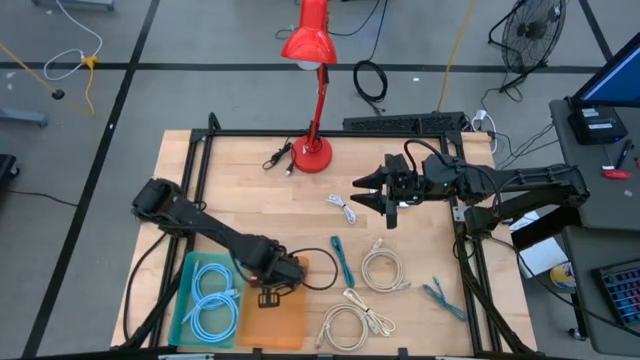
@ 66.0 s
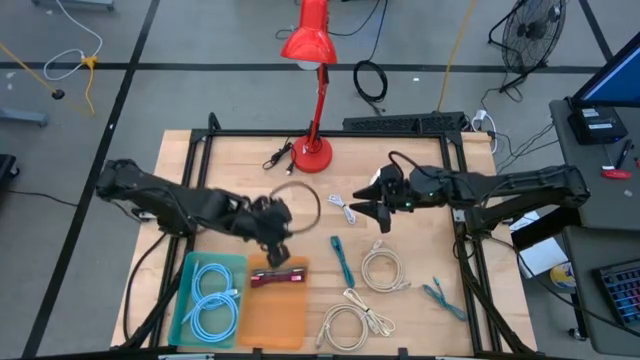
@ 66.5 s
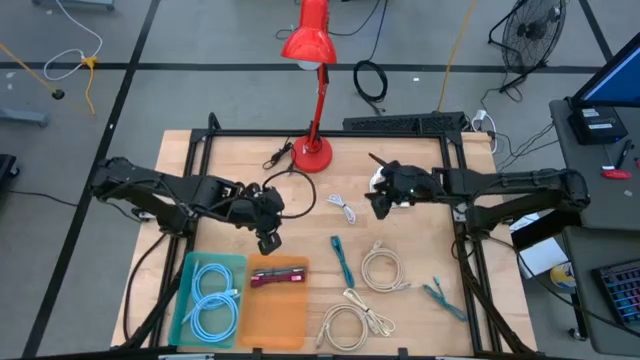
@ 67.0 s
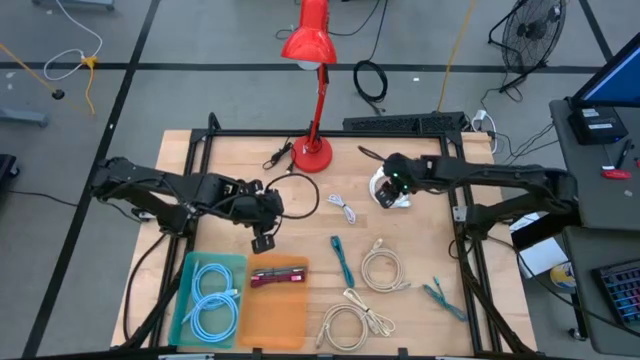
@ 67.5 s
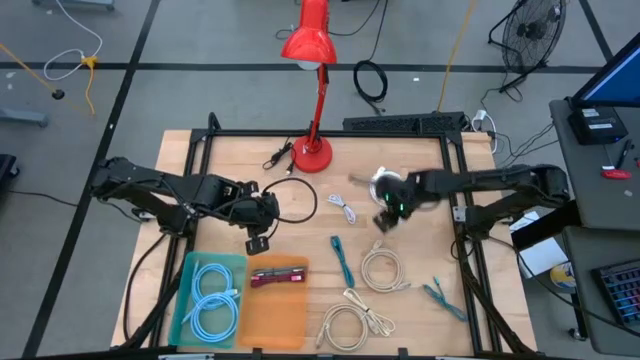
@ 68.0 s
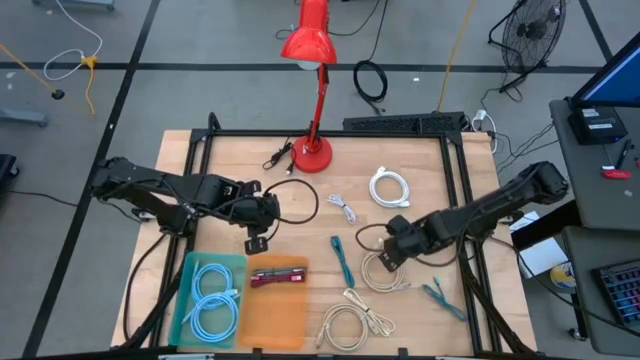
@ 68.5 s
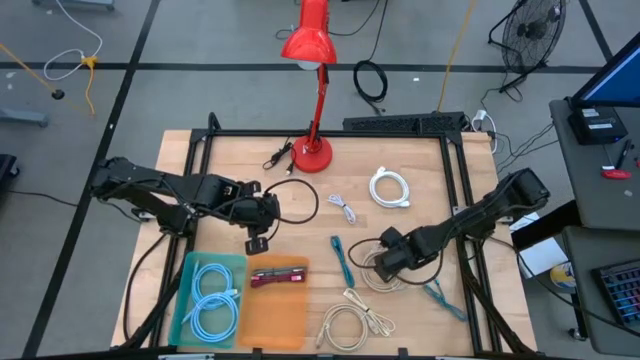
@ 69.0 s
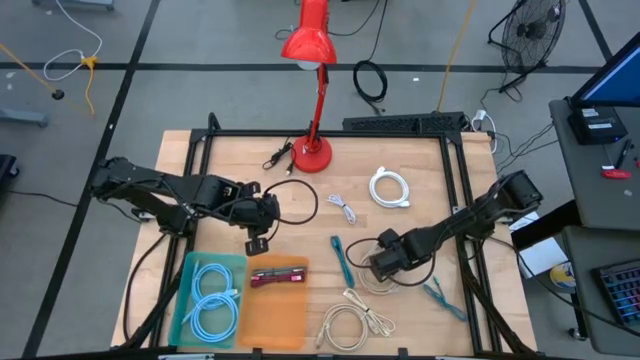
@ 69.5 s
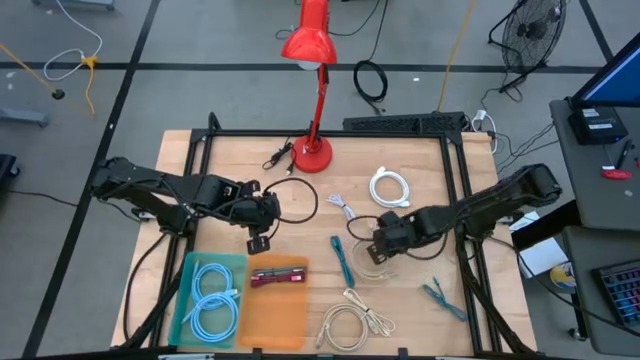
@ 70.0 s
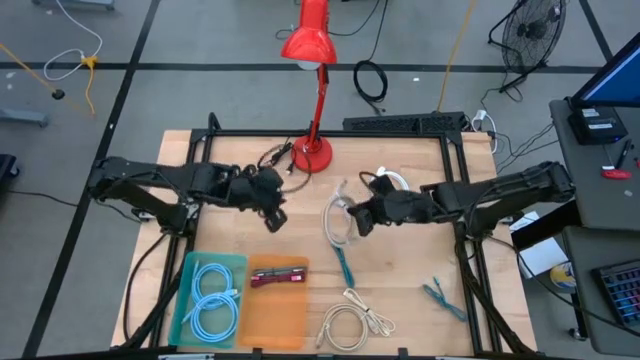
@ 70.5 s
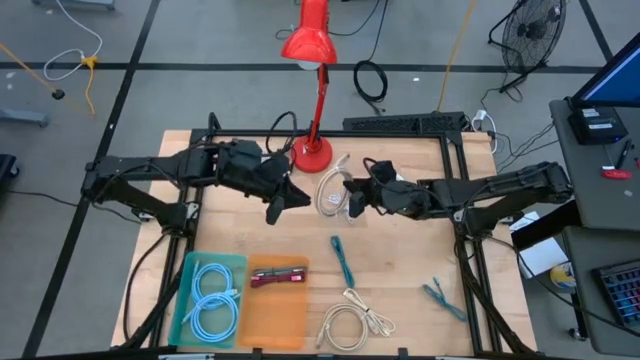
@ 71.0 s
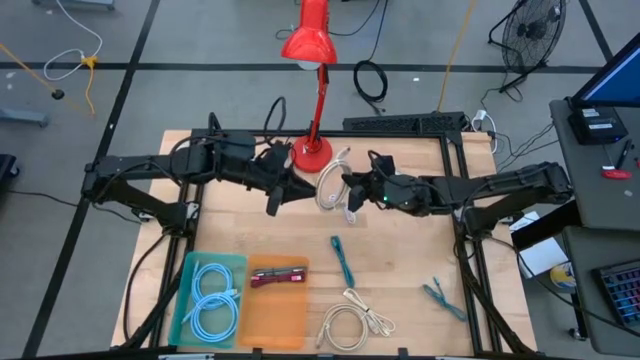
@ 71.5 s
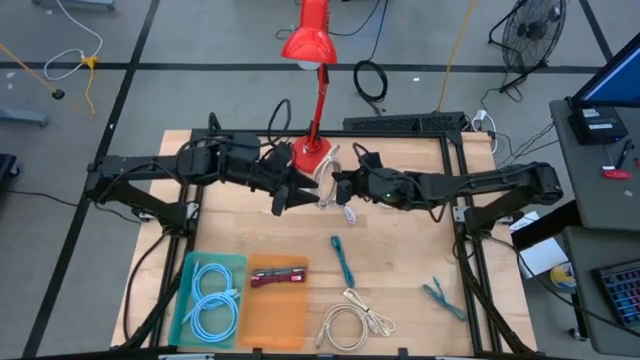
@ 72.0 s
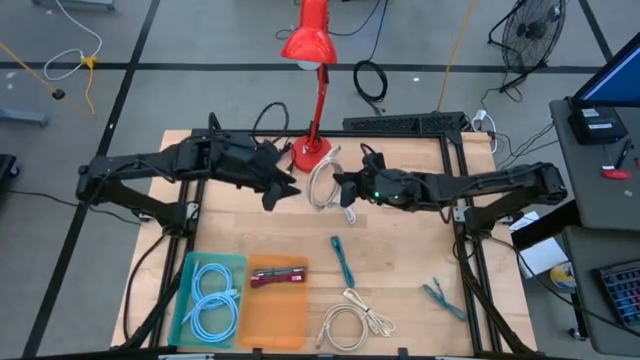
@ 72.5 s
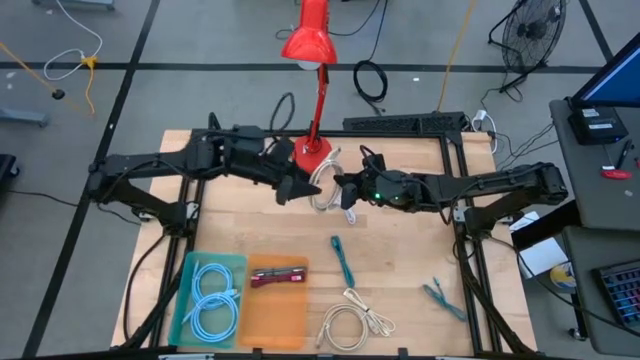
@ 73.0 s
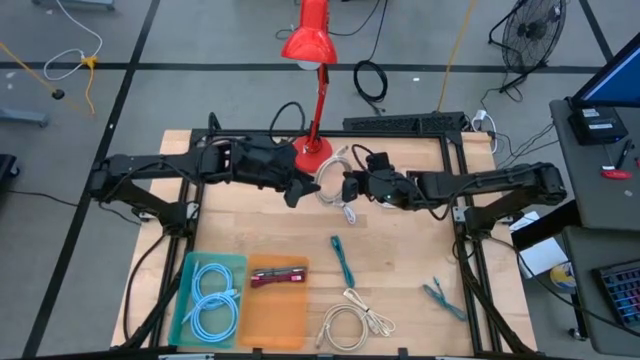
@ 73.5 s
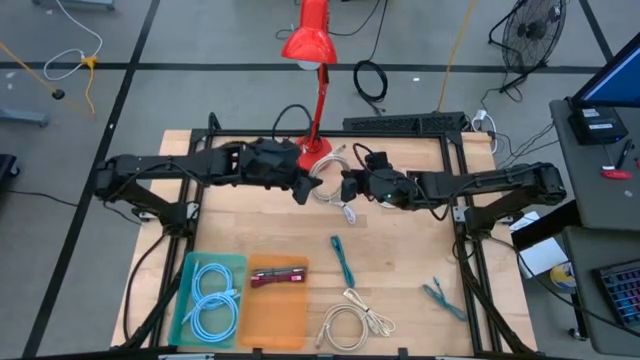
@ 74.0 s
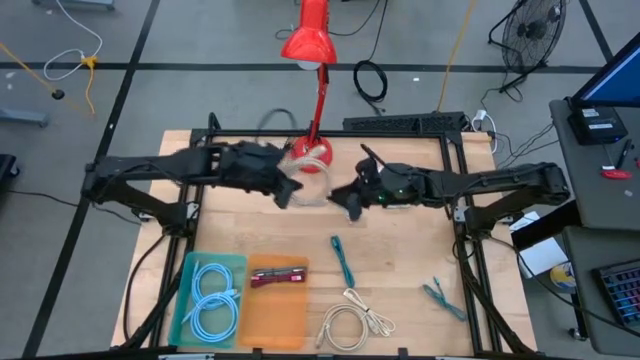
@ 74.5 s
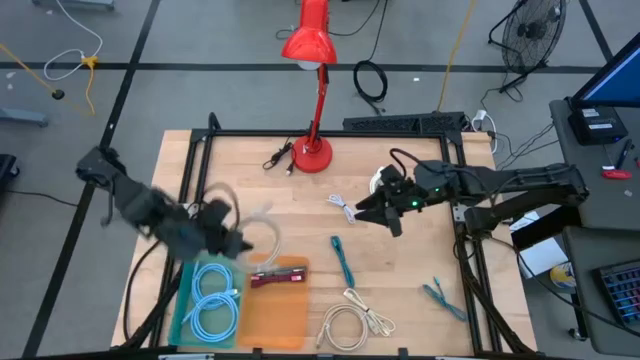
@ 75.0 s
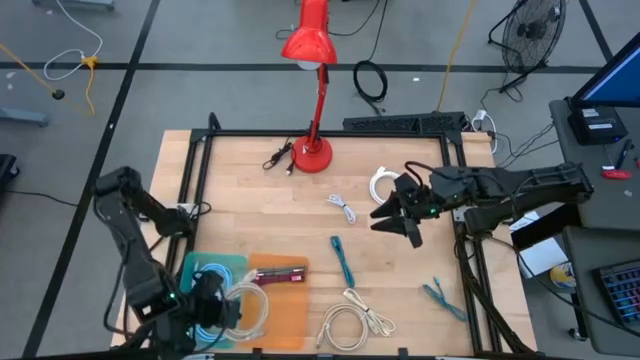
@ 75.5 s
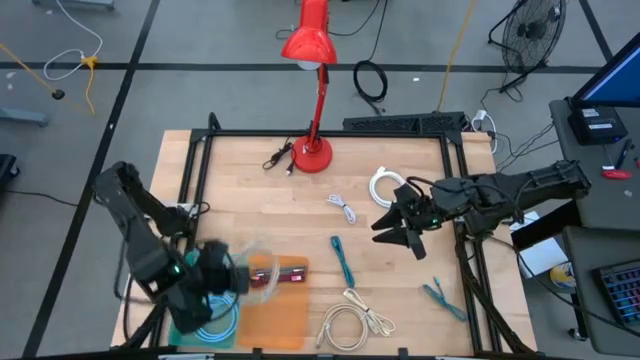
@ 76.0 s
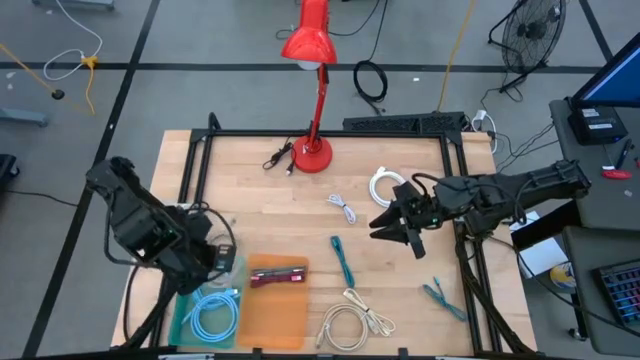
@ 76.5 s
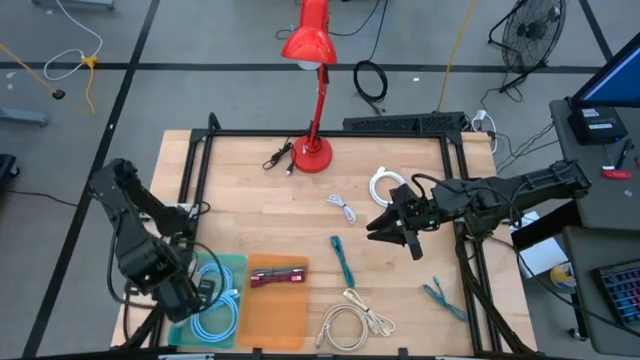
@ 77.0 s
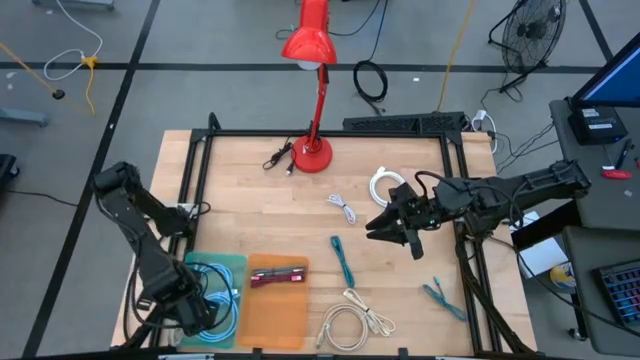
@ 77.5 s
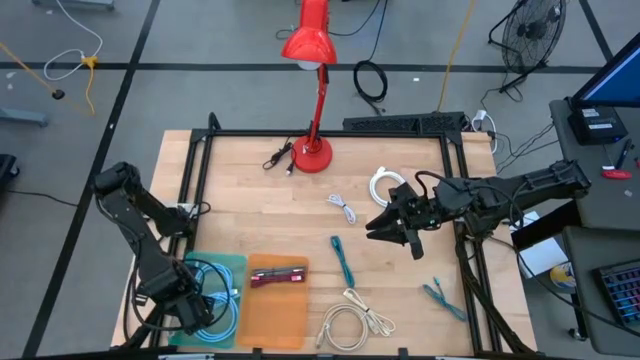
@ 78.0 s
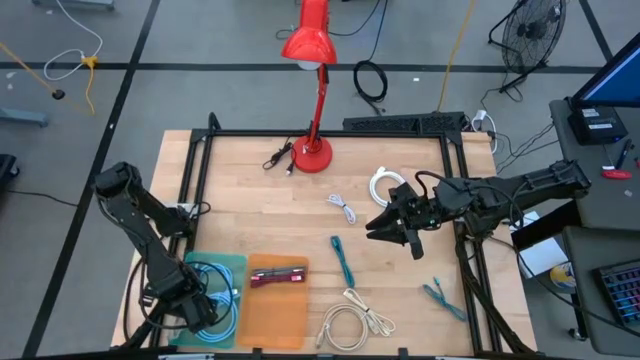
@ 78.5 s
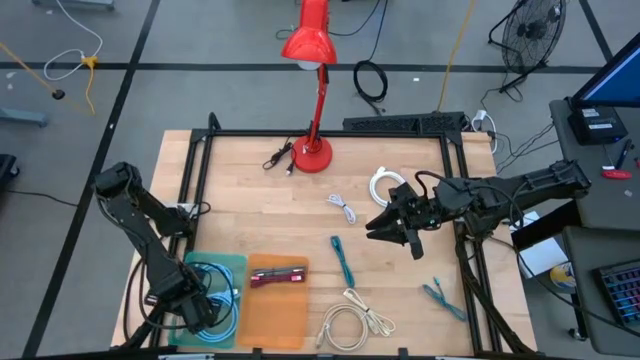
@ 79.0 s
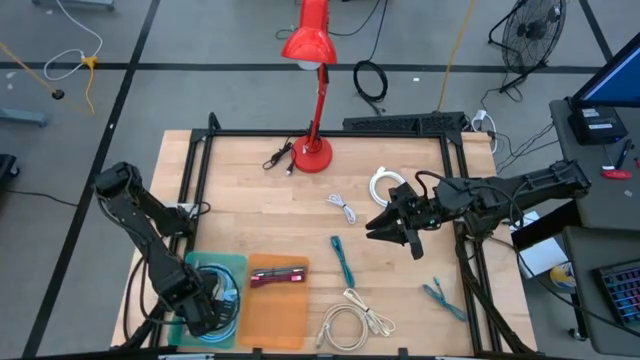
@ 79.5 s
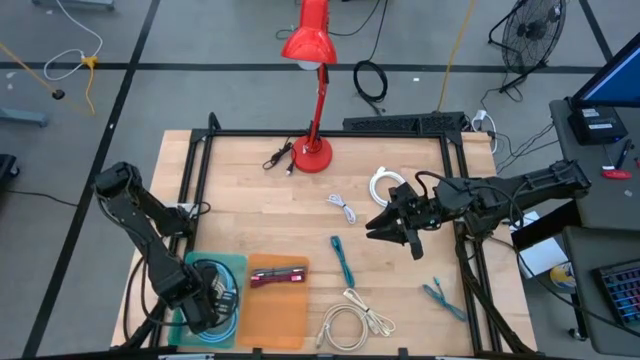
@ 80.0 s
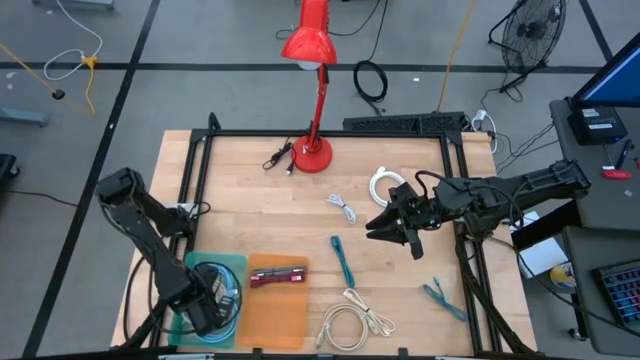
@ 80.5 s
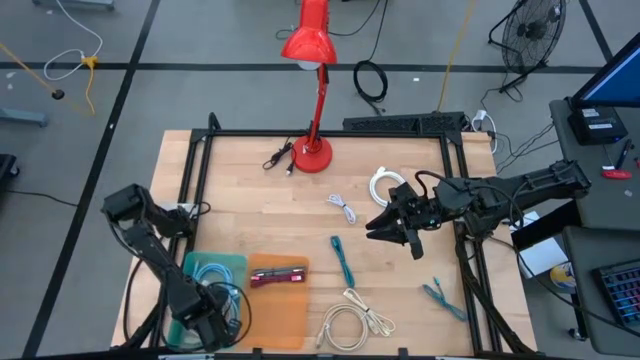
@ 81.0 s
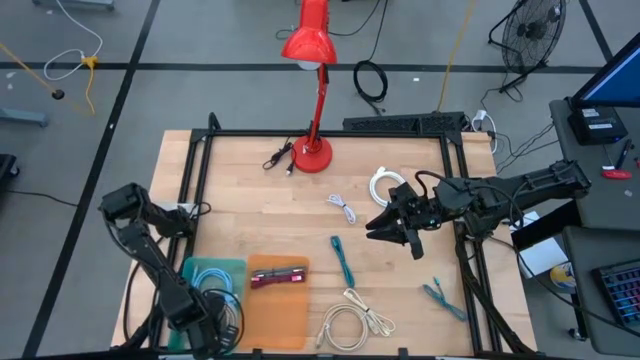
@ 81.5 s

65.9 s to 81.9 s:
Task: Pick & Place USB Port
Put the top brown USB cable into the blue bin
